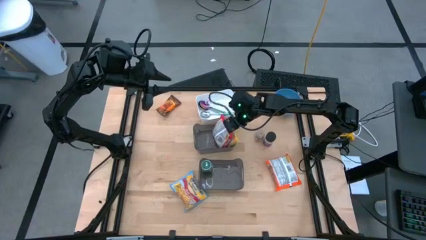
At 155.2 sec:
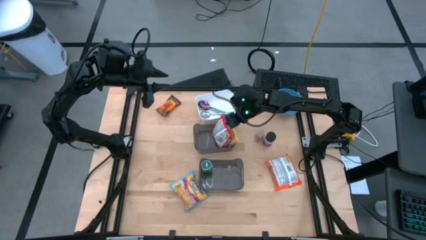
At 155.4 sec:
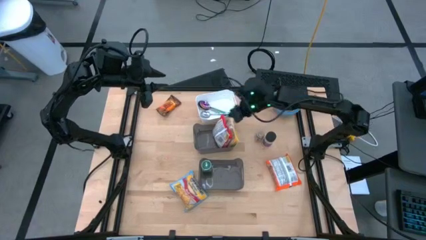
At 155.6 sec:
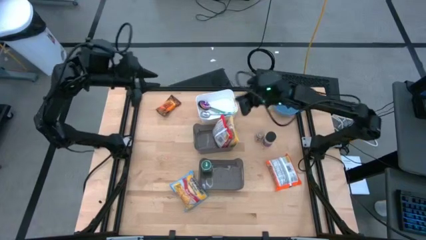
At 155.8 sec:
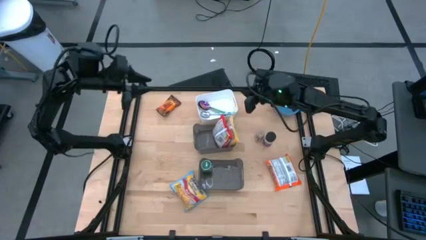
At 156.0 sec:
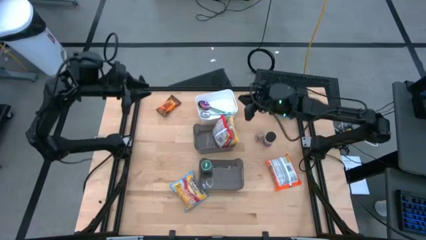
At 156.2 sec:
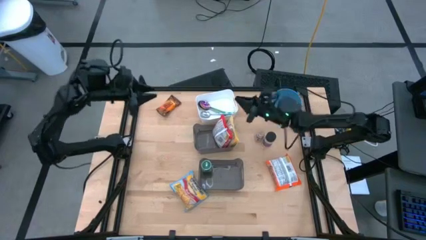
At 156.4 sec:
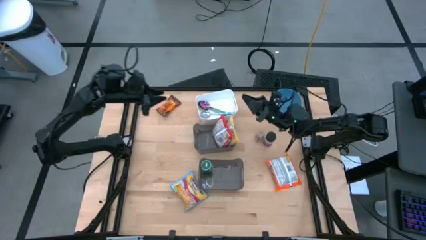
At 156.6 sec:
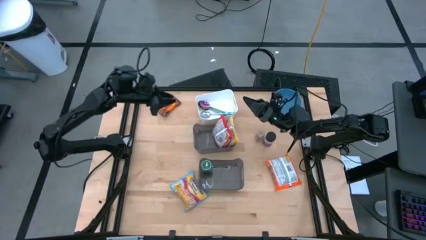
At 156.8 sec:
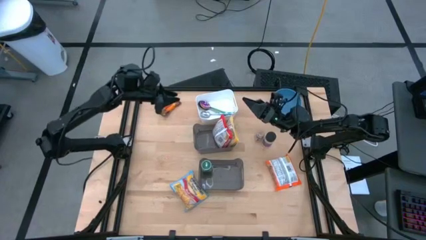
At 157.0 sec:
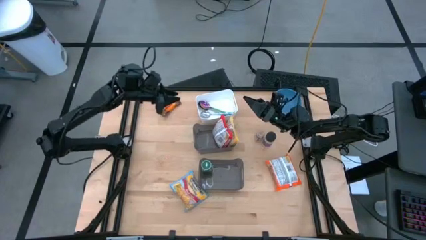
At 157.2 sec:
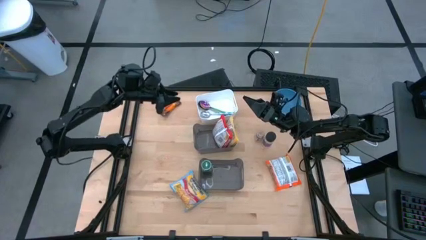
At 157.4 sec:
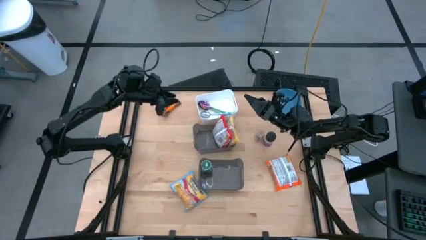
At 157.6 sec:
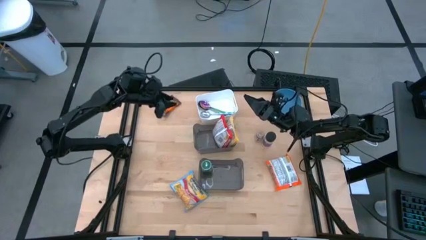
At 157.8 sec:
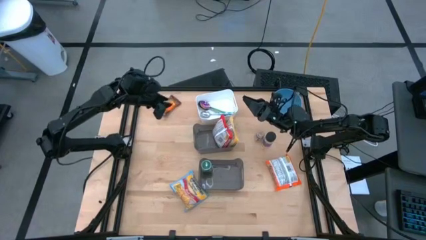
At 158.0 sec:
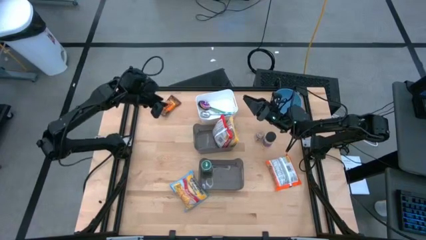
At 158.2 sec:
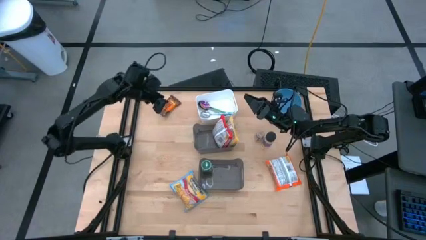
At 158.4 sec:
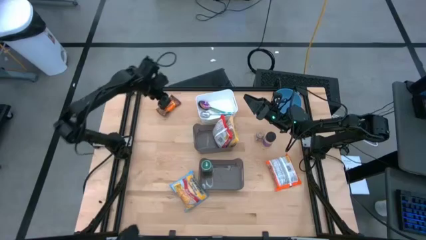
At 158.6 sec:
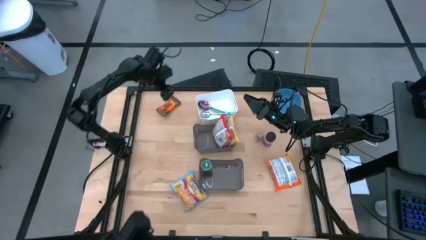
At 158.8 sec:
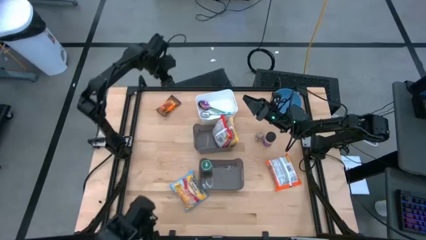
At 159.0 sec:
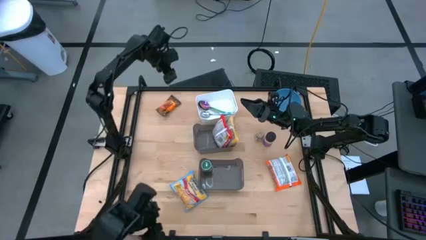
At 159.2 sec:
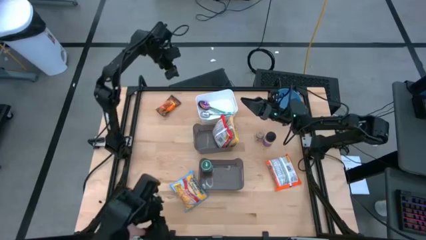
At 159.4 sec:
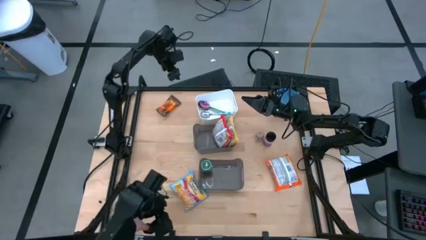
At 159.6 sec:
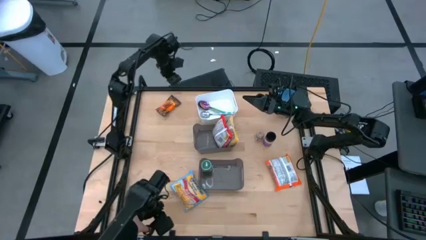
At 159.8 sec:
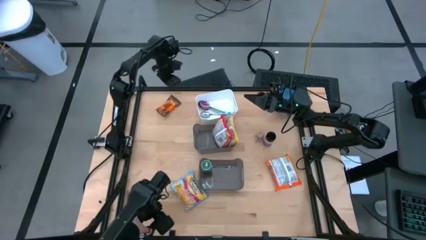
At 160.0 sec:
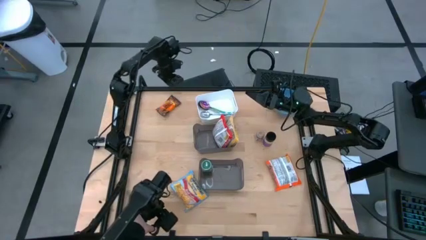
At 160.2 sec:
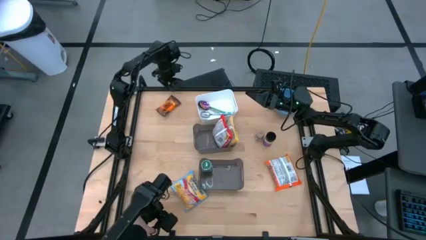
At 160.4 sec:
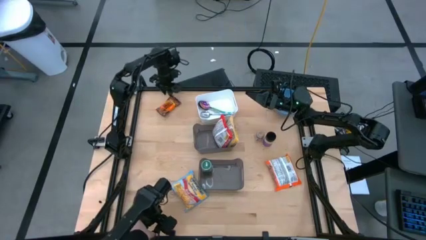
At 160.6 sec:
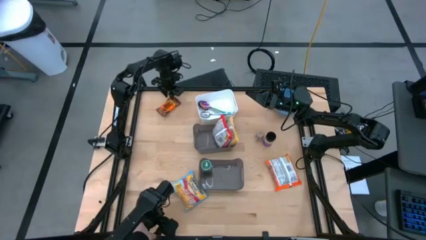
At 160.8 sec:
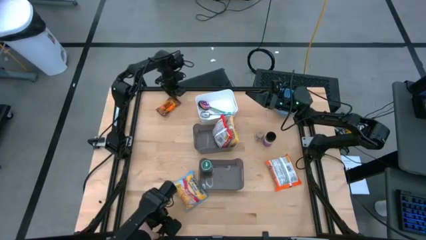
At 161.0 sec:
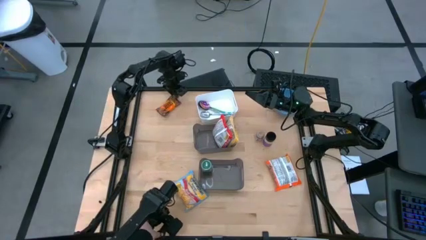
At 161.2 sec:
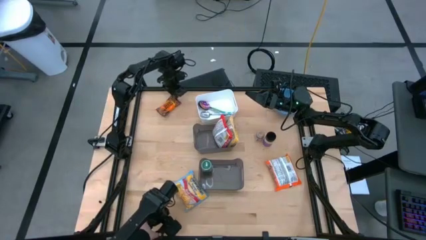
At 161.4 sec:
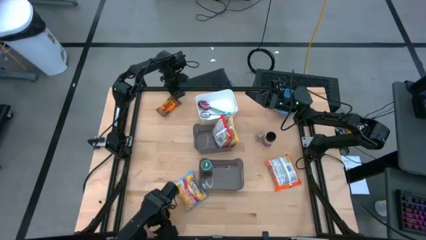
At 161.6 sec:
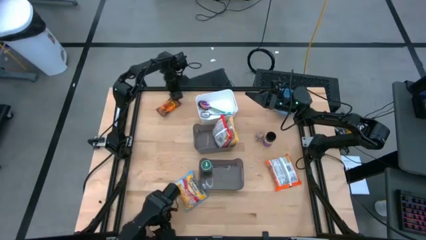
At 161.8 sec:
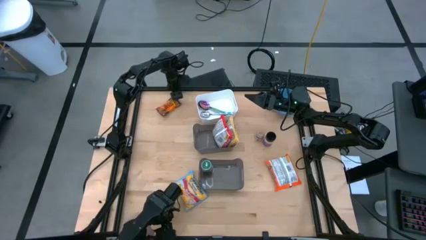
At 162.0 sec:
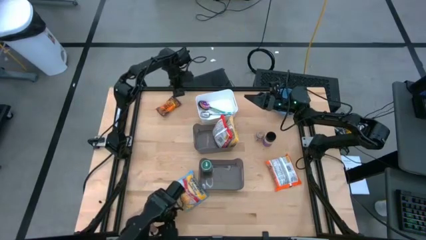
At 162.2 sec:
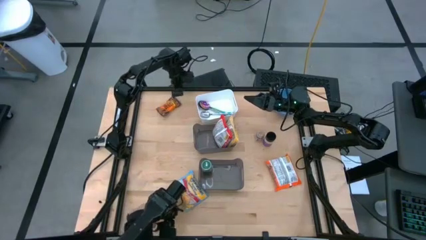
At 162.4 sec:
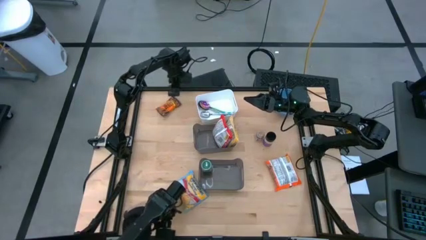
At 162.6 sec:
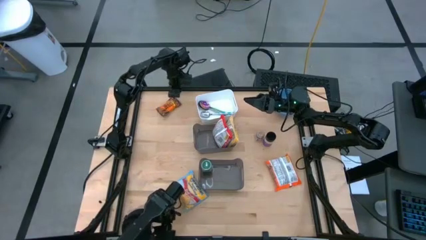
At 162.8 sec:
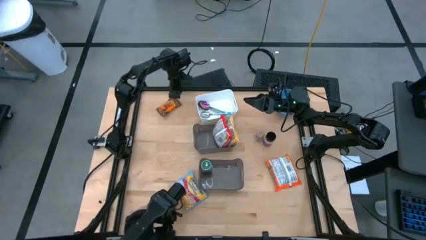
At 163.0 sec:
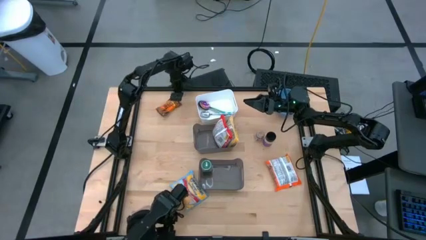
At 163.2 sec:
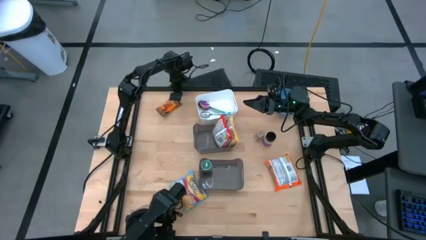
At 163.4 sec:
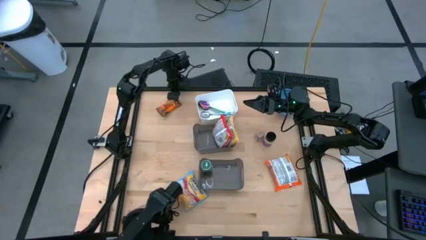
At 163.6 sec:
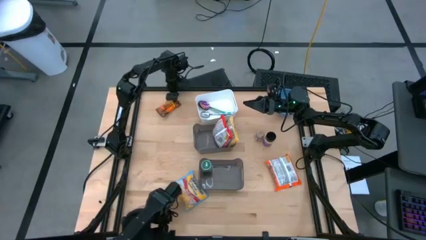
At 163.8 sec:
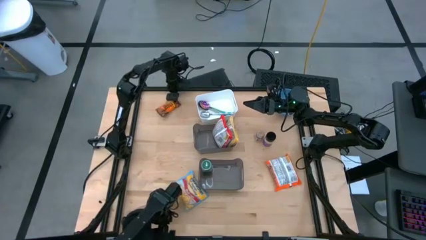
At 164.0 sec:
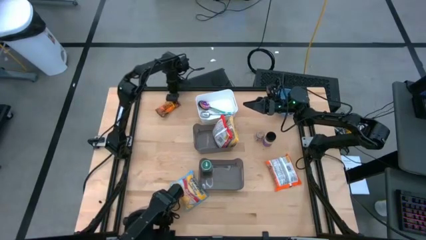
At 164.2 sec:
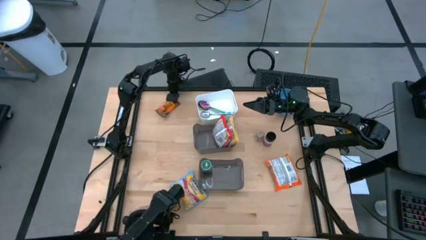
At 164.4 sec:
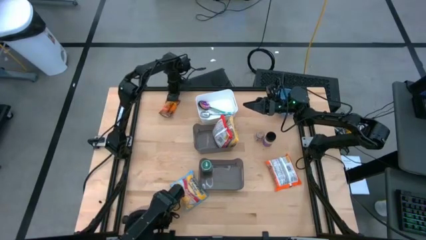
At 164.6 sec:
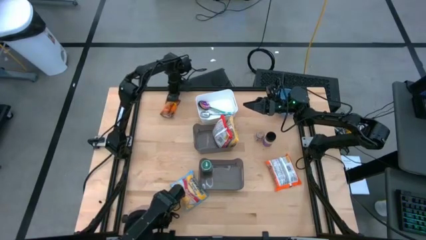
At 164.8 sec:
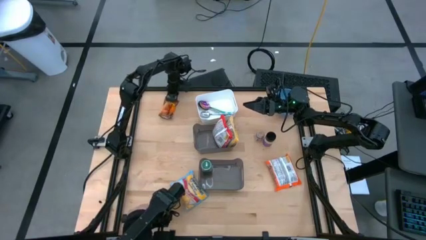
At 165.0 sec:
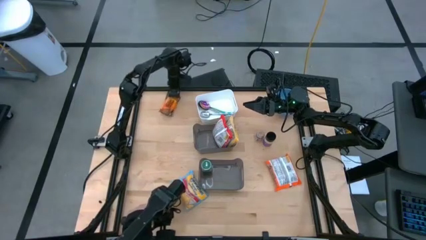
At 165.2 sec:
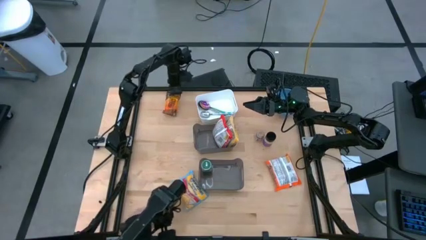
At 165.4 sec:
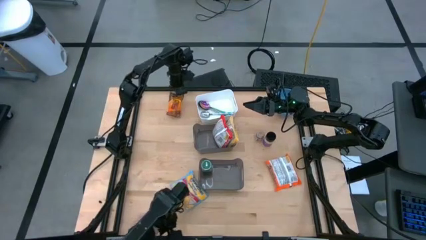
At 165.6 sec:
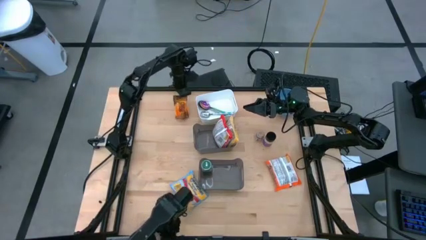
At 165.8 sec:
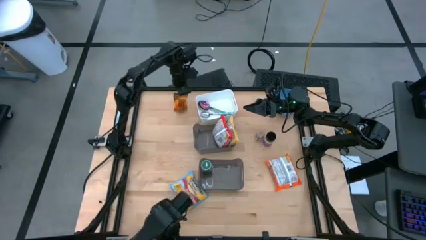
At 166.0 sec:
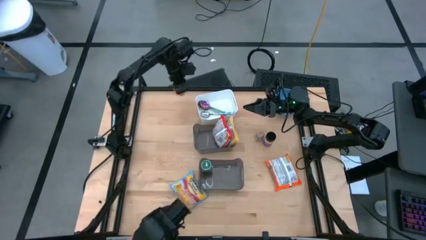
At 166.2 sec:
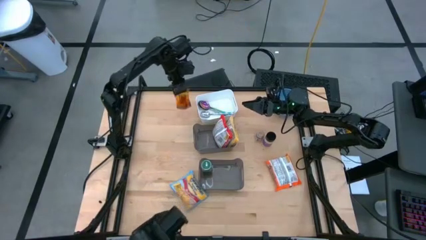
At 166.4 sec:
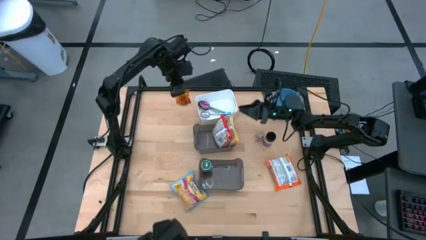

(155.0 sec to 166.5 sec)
Task: Pick & Place Food Item
Put the orange seasoning pack into the bottom black bin

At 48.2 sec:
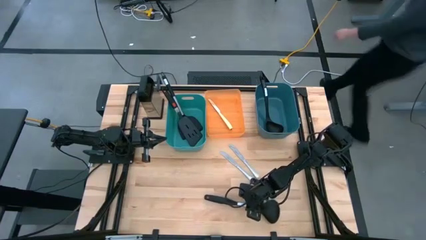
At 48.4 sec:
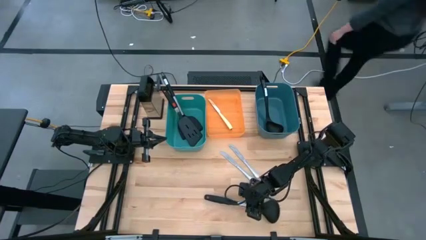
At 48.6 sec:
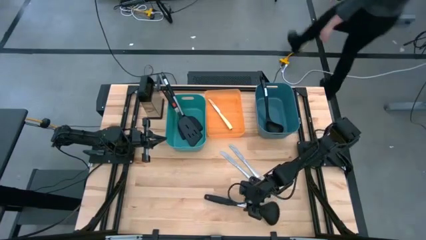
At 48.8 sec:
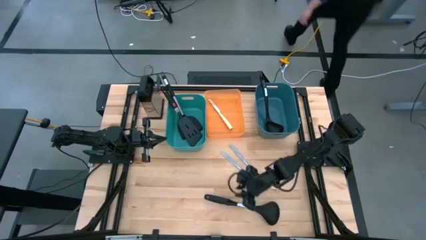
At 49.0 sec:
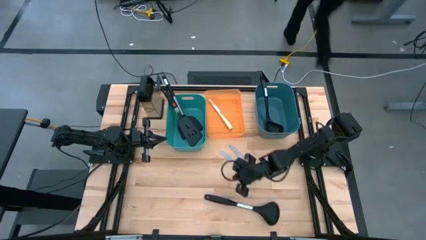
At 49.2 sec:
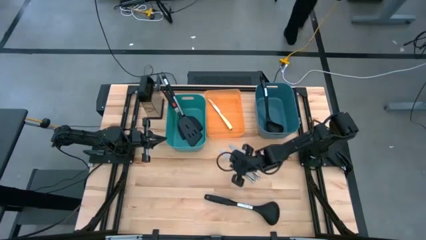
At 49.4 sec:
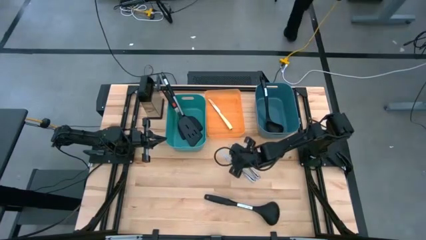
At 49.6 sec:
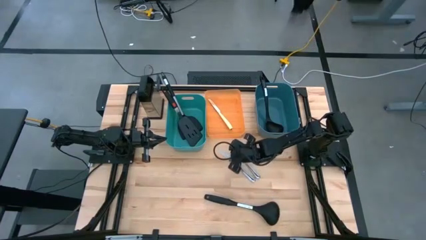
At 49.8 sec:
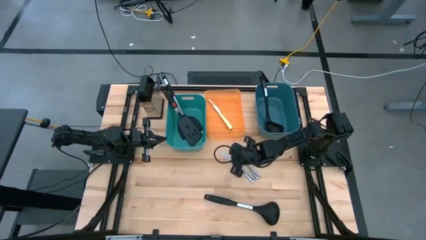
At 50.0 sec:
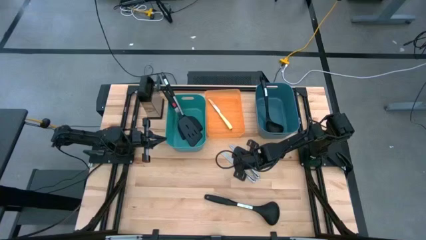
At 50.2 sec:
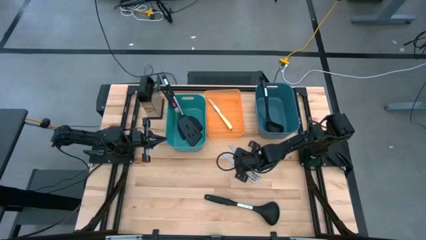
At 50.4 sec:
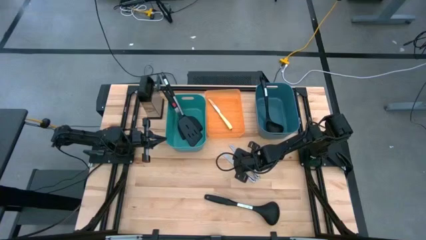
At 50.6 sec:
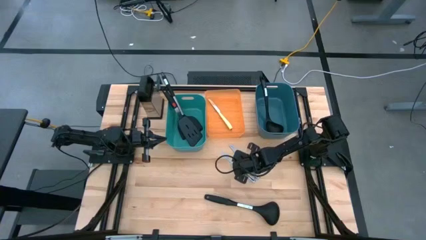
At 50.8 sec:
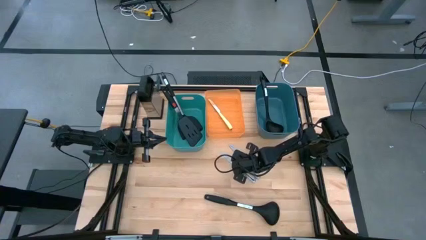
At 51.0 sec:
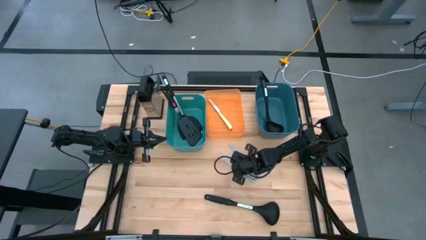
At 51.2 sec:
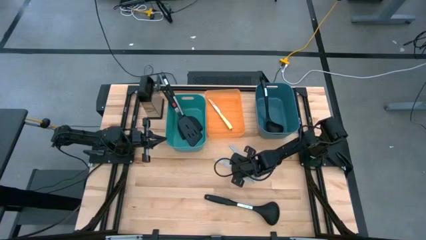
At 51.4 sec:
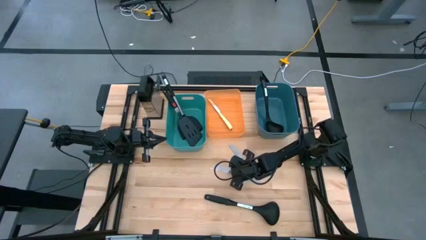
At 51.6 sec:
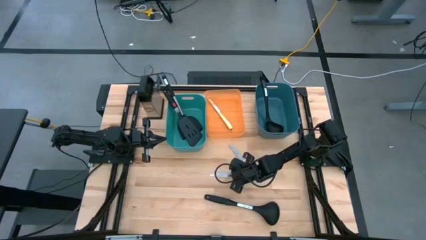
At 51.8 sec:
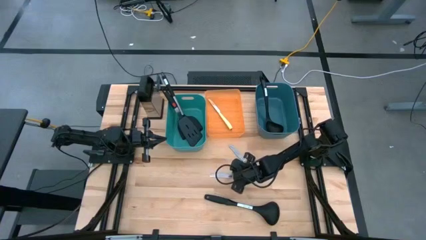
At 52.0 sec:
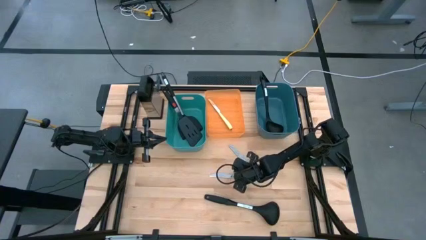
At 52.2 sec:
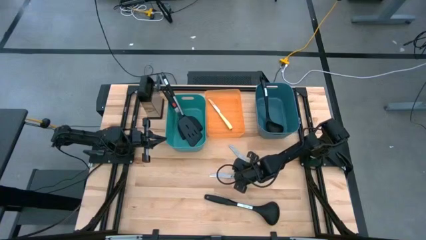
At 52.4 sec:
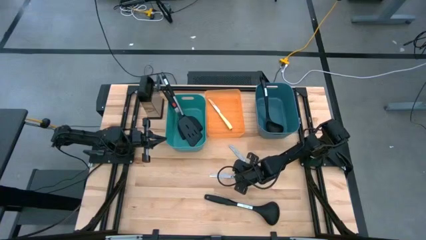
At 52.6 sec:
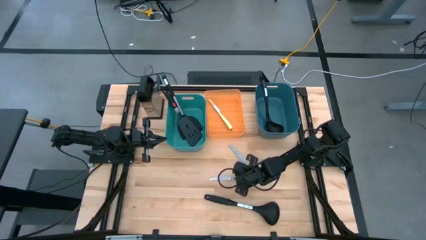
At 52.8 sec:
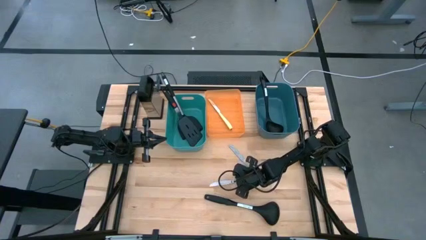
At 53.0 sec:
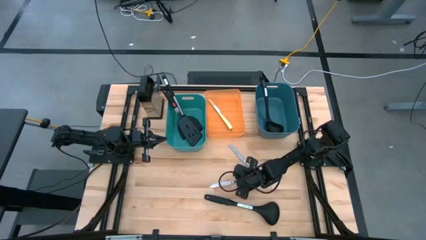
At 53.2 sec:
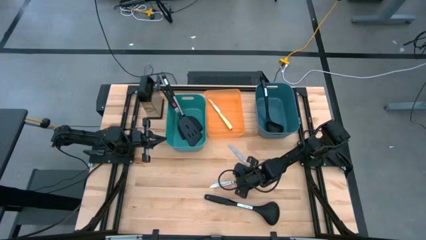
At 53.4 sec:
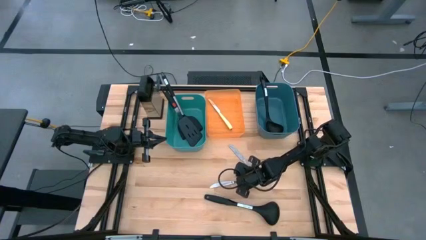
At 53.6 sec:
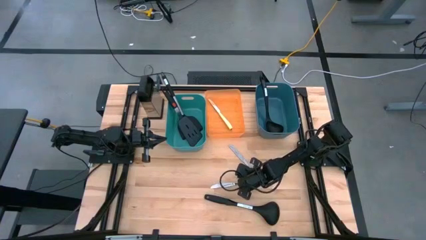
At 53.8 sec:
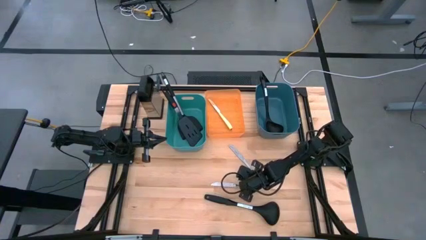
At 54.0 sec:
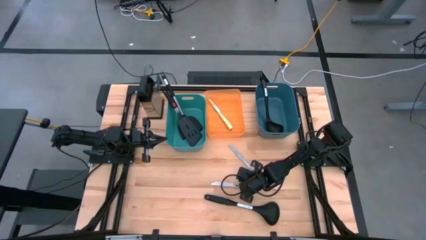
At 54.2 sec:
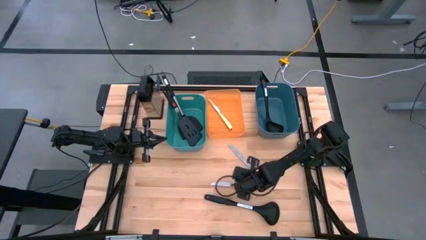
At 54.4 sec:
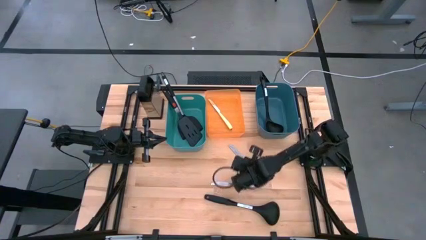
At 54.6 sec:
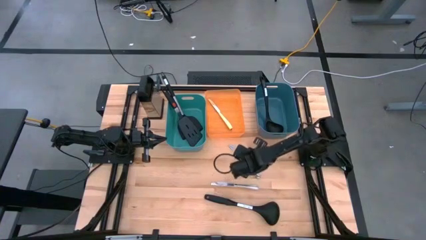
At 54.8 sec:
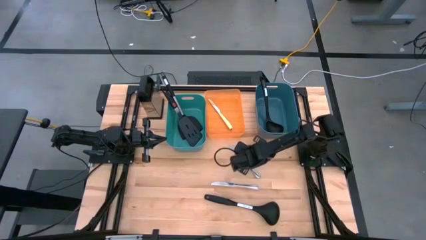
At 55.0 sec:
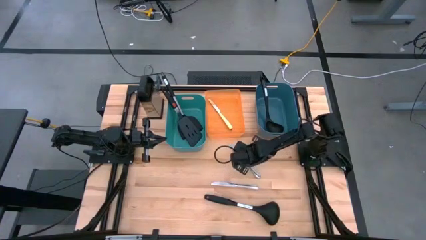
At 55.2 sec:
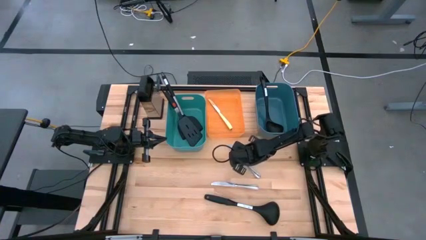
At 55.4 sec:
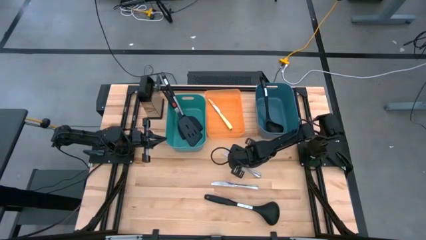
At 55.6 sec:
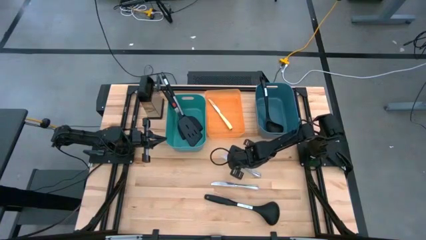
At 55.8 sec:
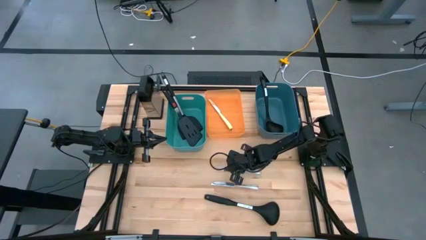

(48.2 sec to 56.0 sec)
Task: Pick & Place Kitchen Items
Adjust the silver knives
